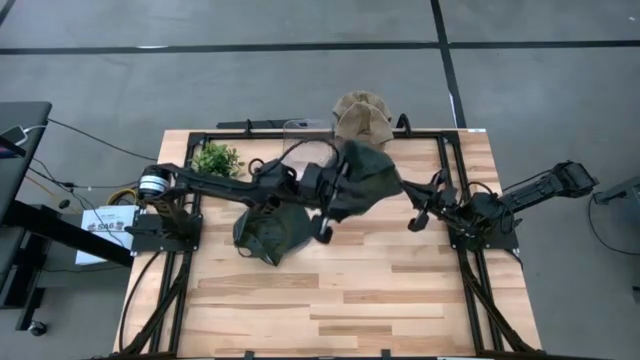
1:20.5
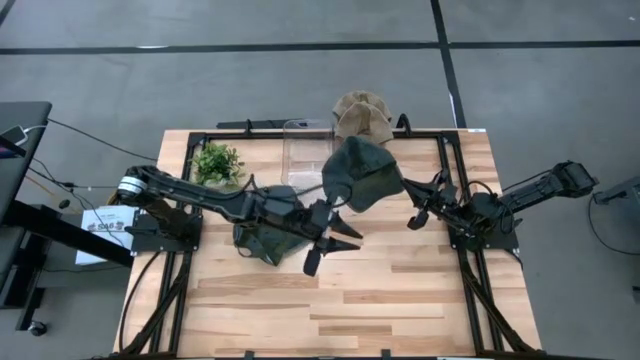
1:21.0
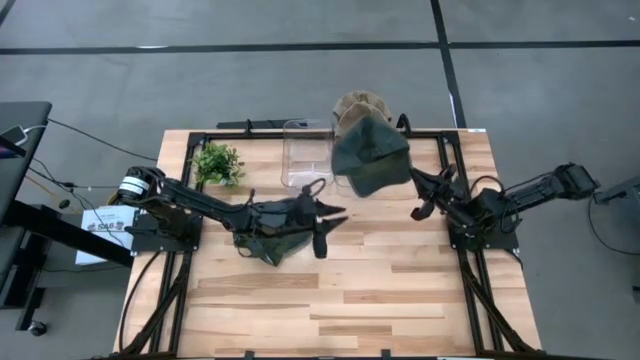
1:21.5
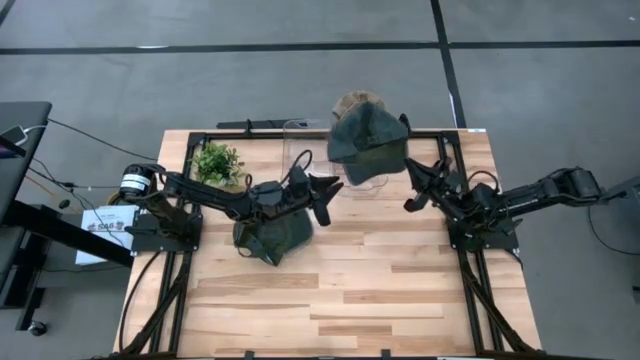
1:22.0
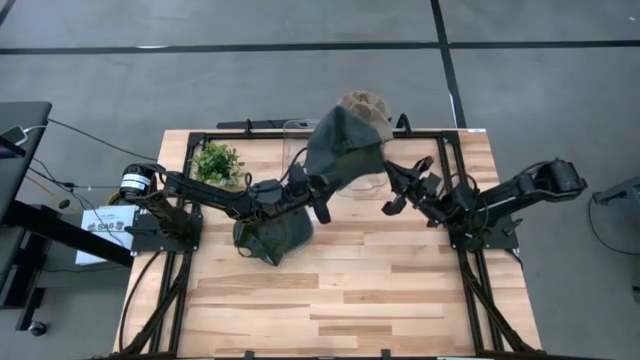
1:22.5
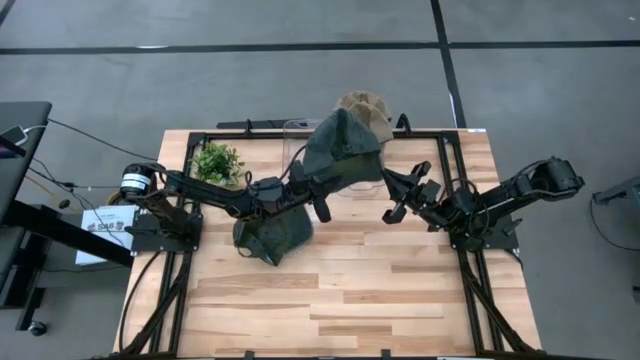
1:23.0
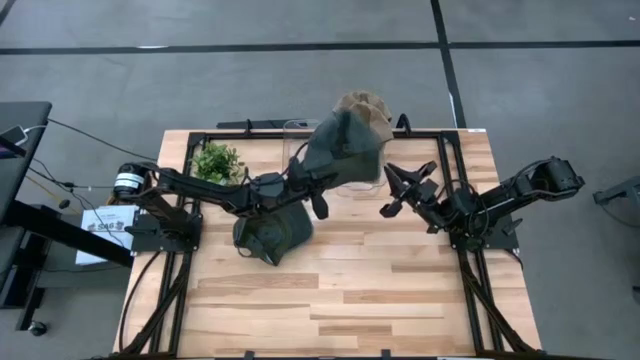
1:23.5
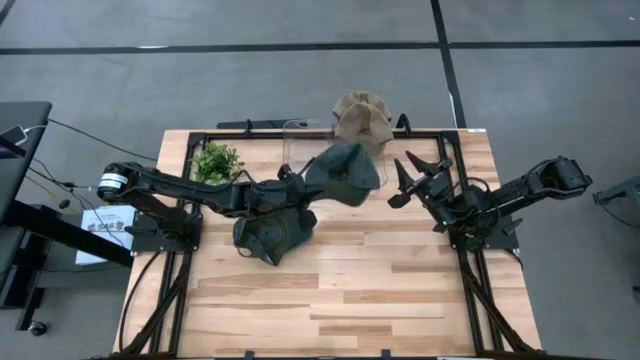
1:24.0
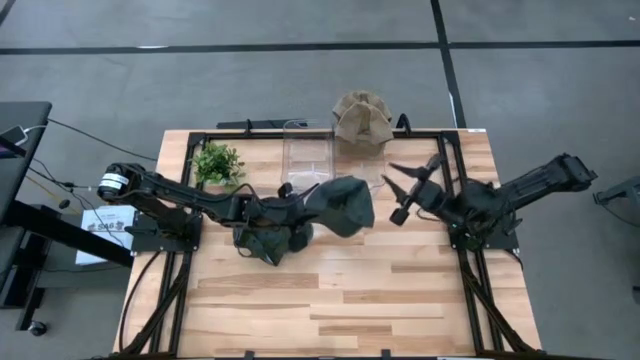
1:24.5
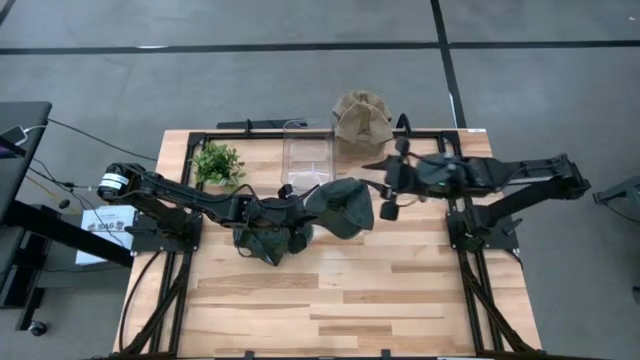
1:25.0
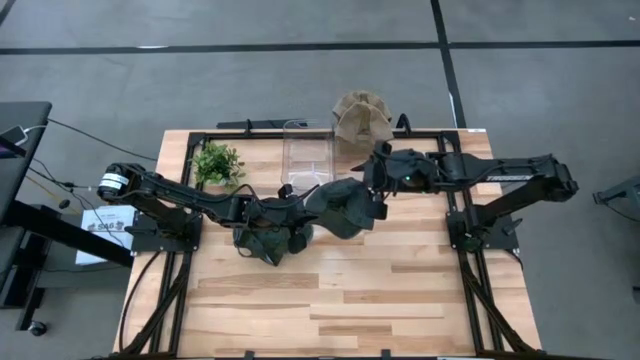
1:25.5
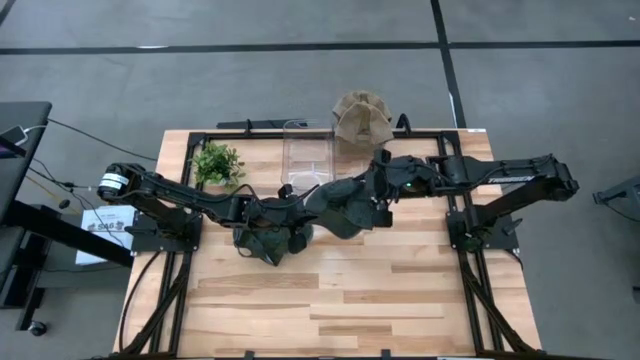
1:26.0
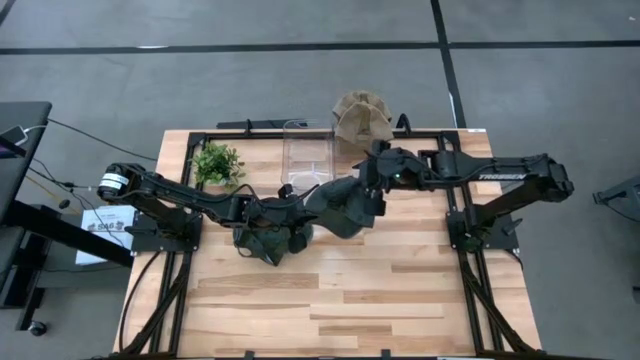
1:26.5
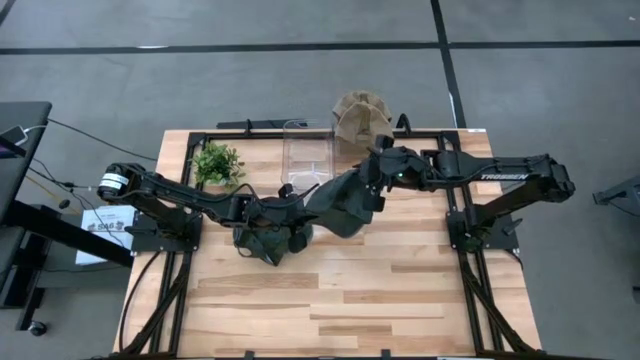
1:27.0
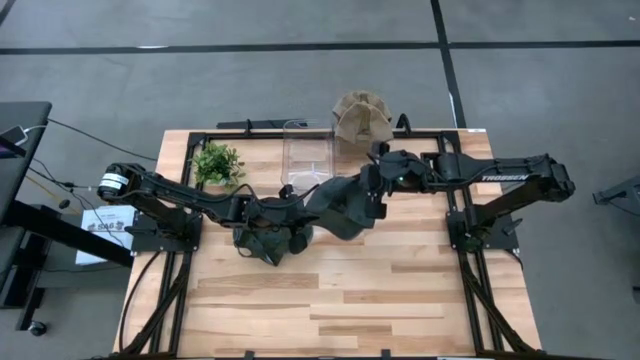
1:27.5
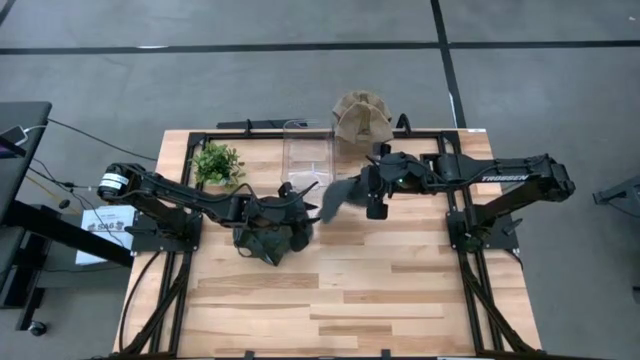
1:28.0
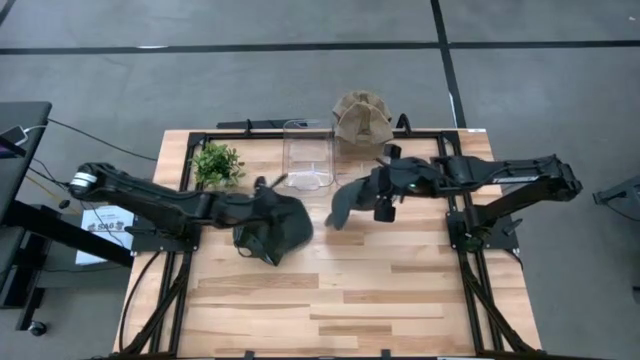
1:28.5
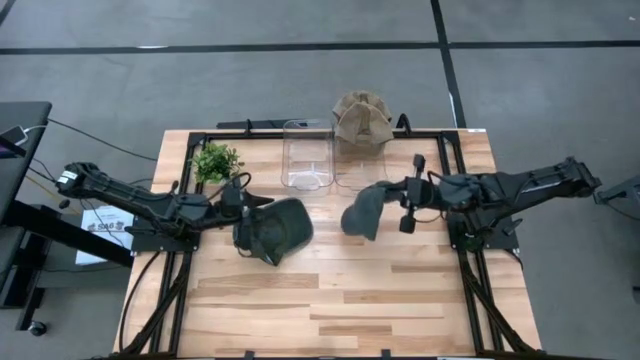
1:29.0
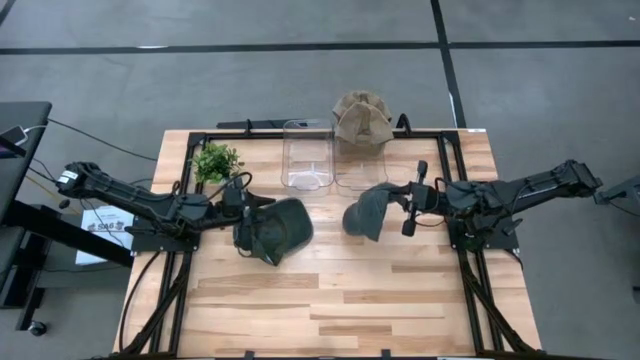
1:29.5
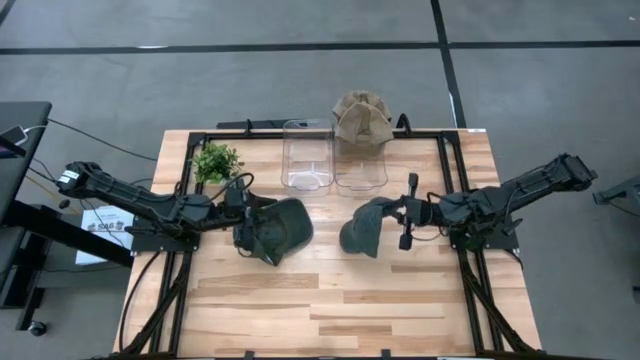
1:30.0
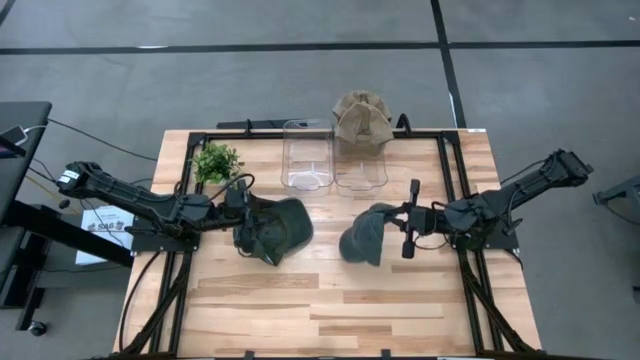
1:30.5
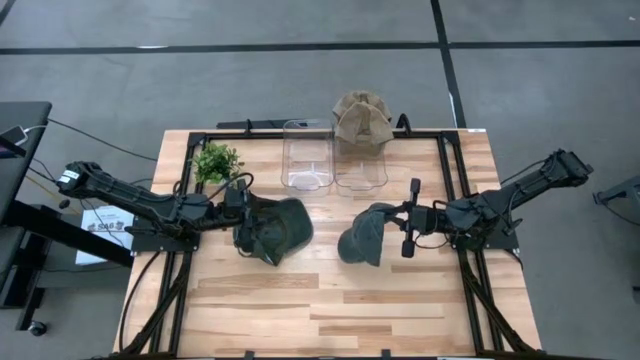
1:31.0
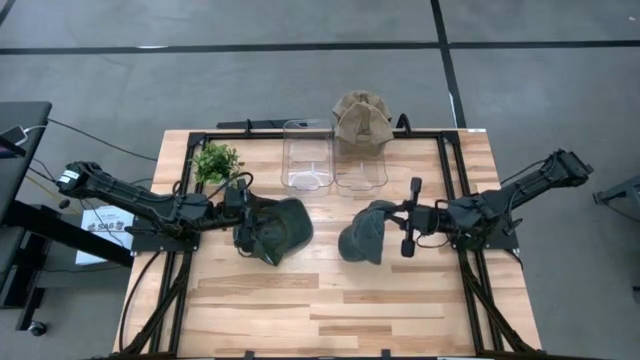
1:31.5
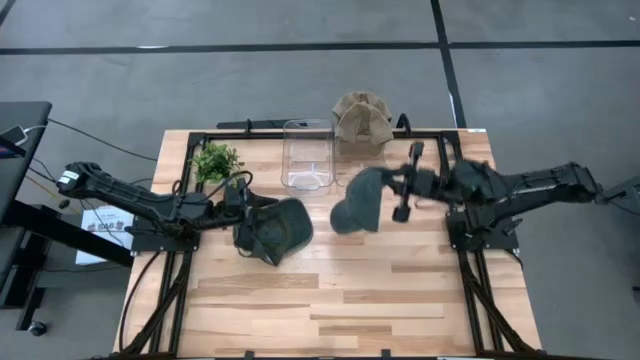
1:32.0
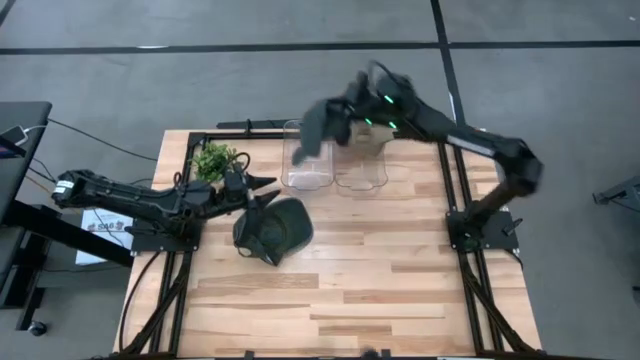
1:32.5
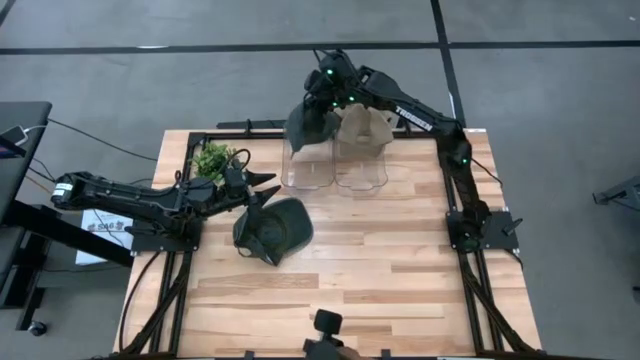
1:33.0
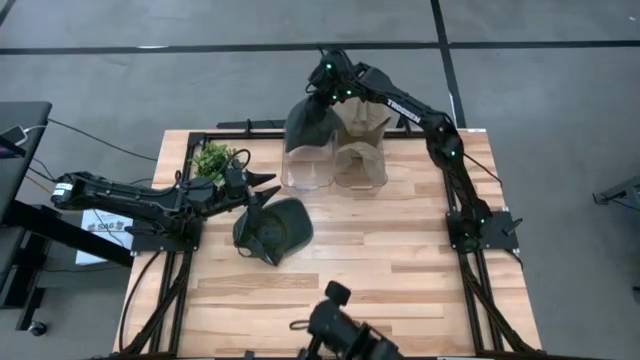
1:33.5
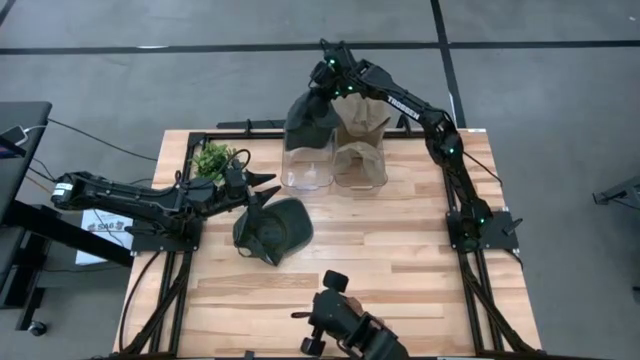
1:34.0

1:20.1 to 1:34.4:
Task: Pick & Place hat
Put the right black cap into the left transparent bin

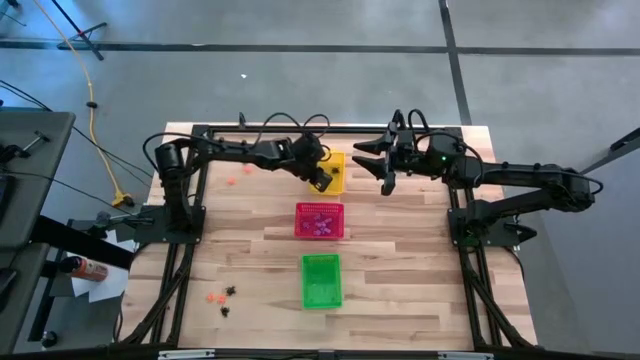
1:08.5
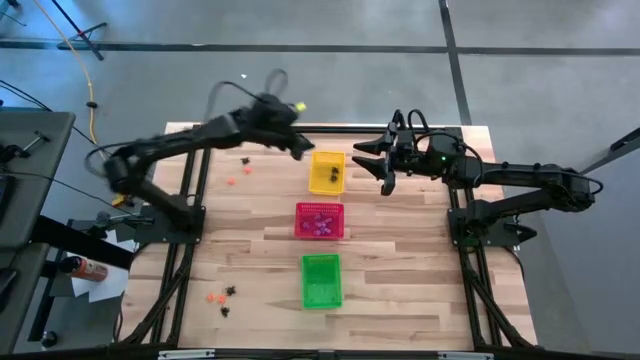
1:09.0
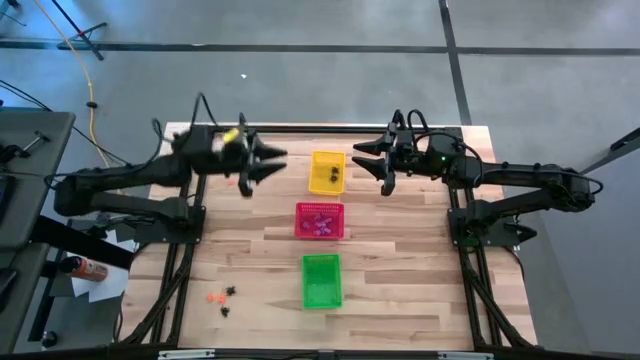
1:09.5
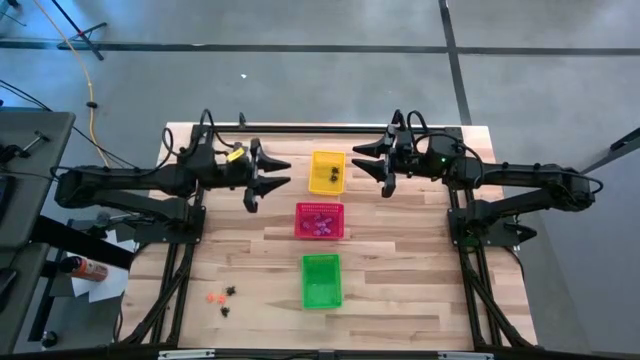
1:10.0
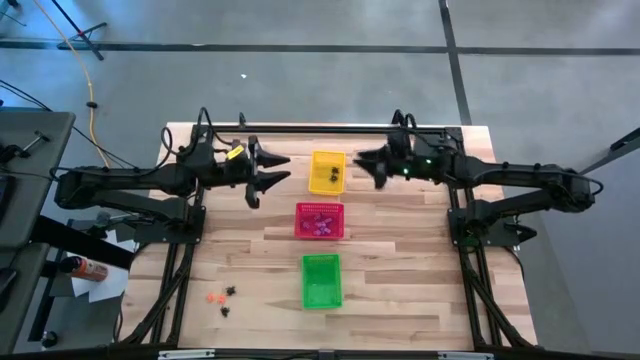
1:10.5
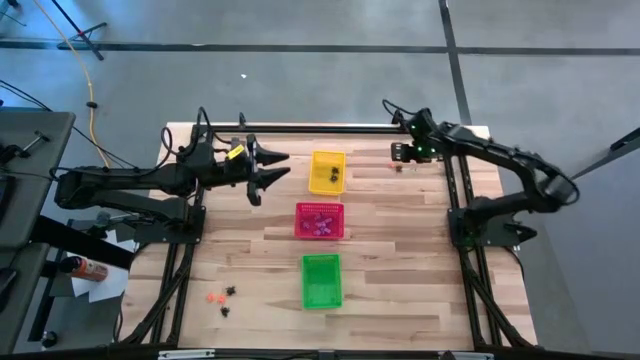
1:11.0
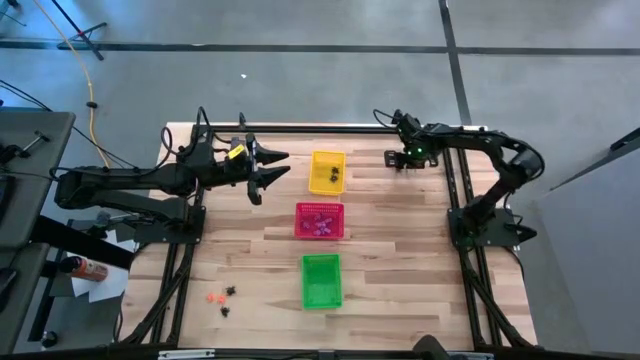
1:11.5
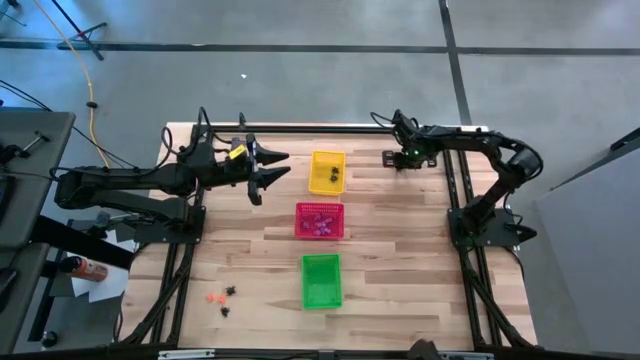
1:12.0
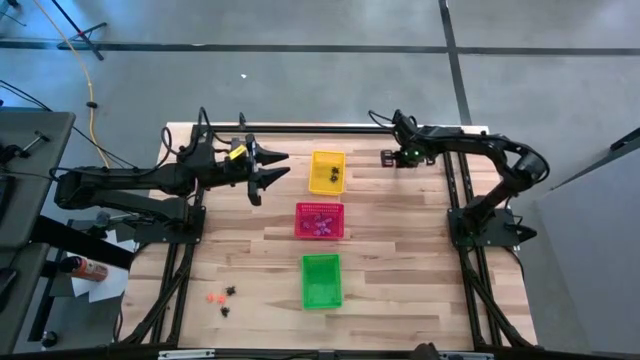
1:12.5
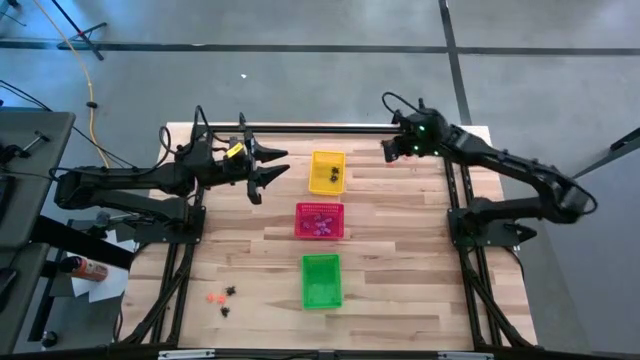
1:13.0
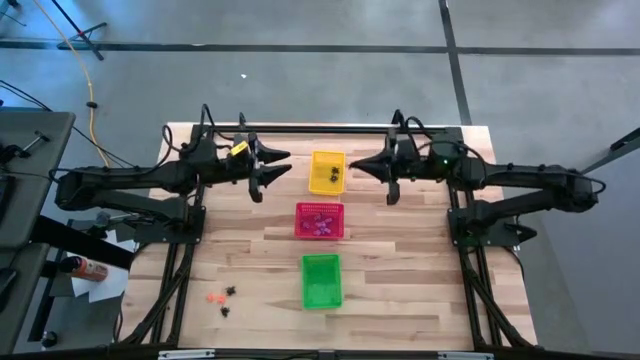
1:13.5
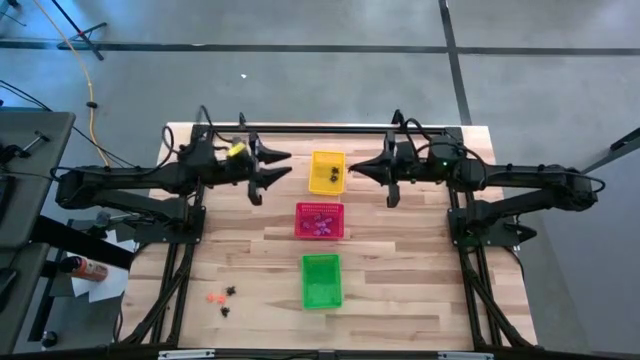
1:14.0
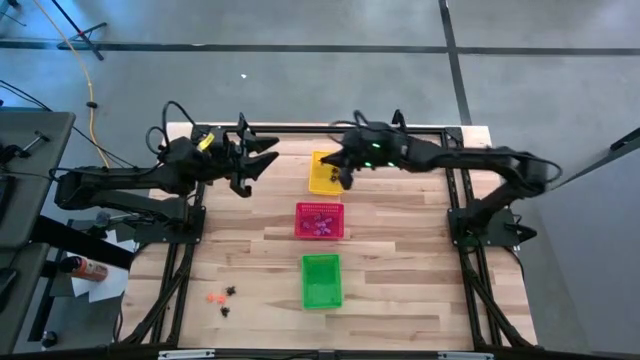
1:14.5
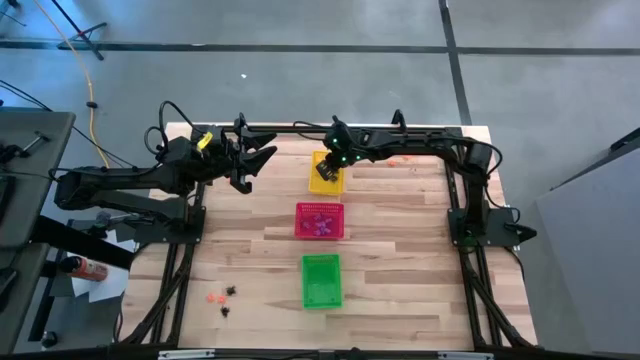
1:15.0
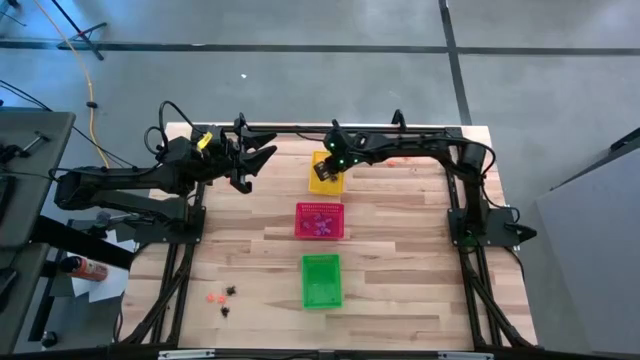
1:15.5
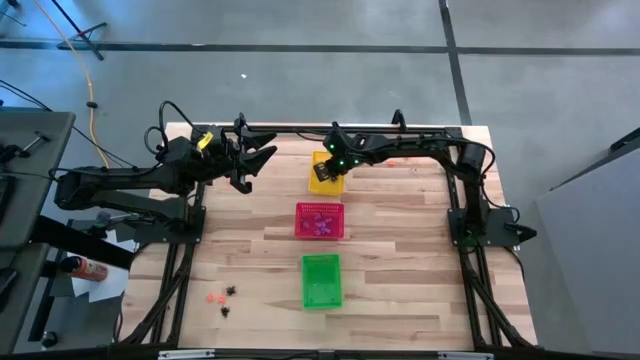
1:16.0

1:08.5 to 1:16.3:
Task: Sort Halloween decoration
Put the black spider toy into the yellow bin
